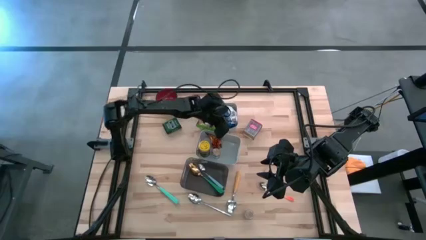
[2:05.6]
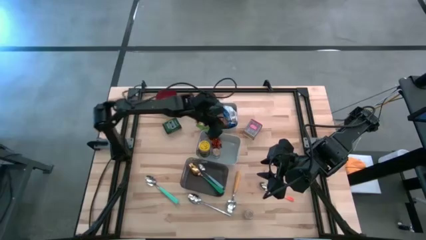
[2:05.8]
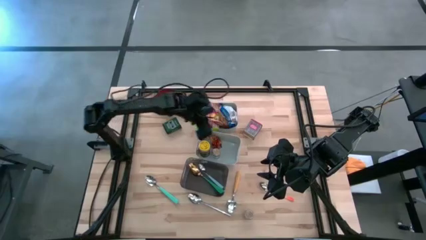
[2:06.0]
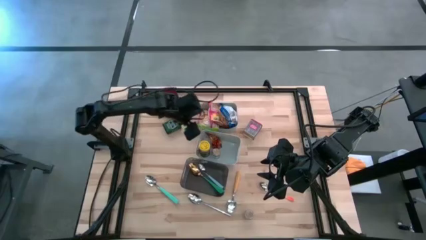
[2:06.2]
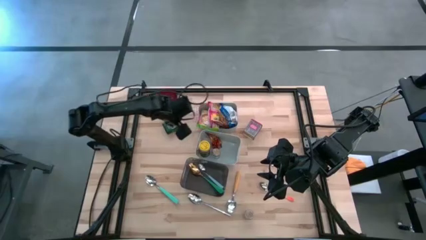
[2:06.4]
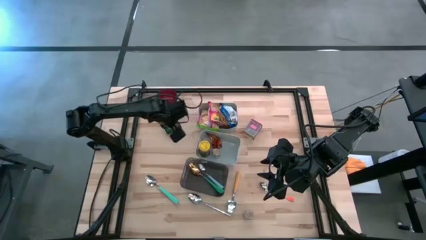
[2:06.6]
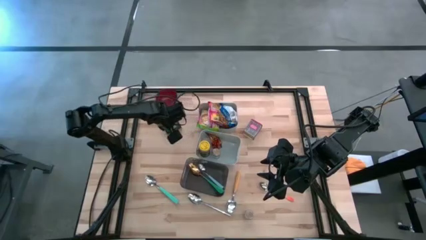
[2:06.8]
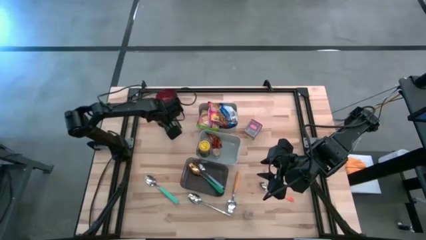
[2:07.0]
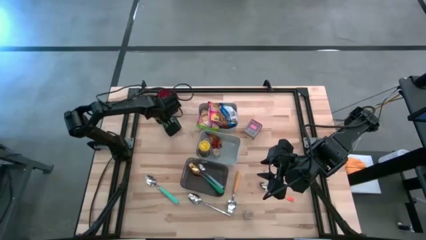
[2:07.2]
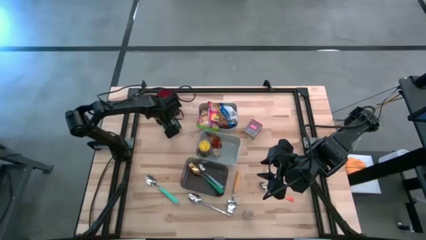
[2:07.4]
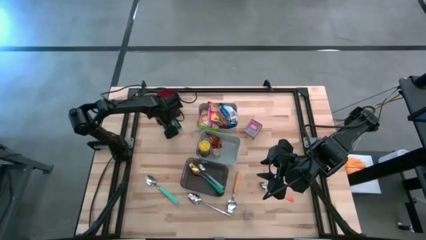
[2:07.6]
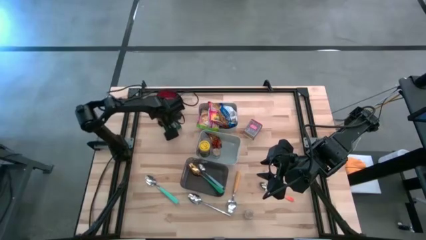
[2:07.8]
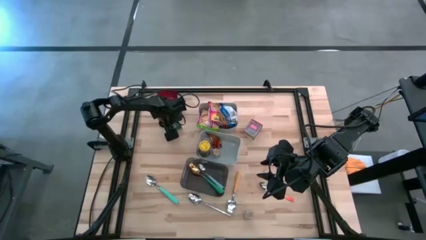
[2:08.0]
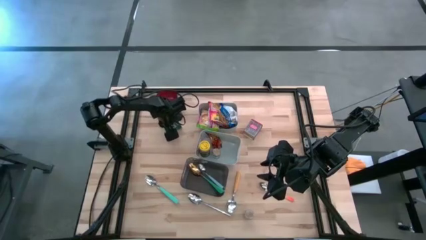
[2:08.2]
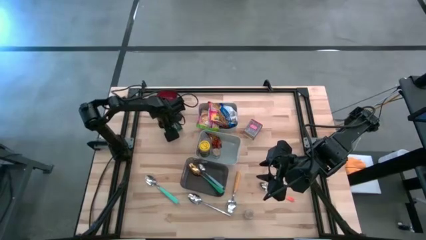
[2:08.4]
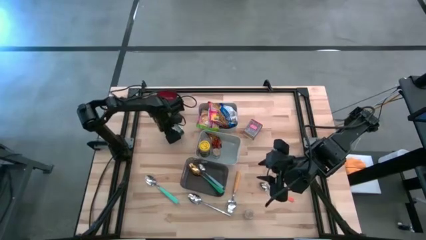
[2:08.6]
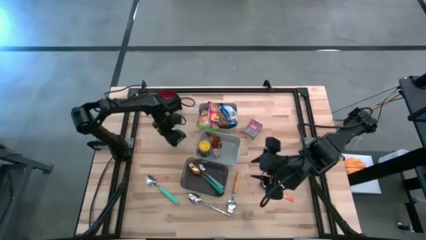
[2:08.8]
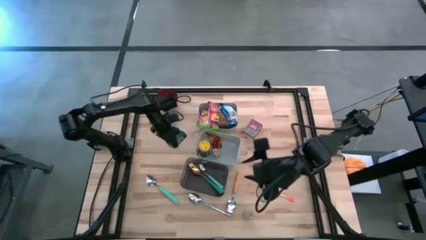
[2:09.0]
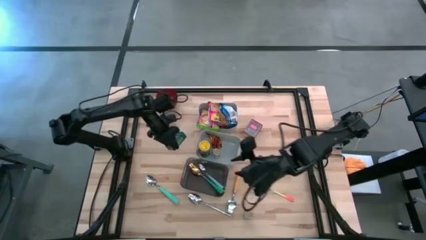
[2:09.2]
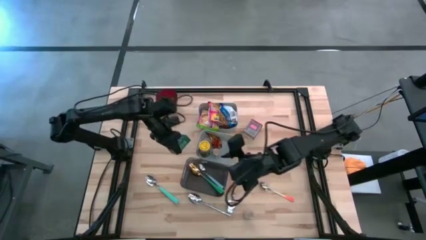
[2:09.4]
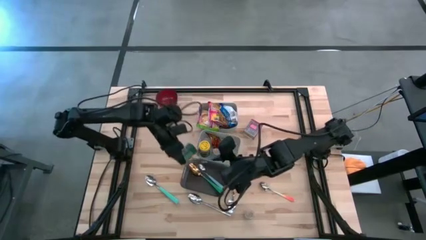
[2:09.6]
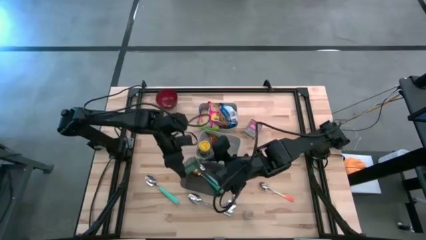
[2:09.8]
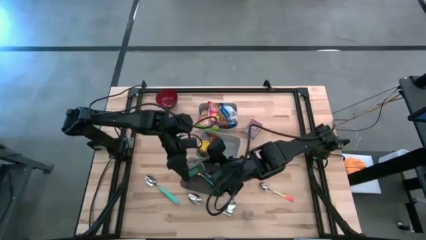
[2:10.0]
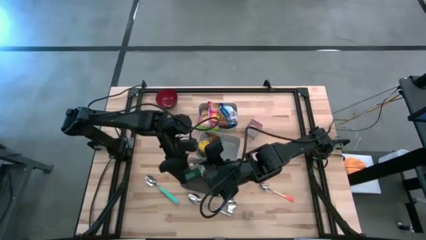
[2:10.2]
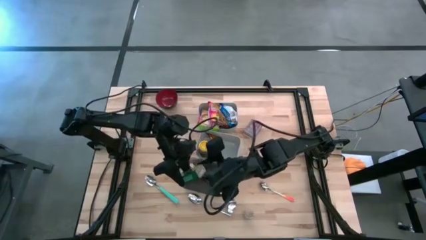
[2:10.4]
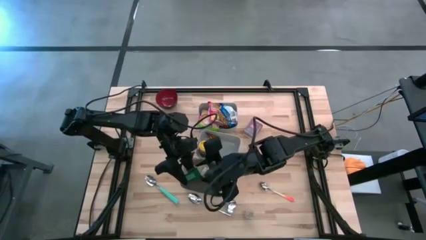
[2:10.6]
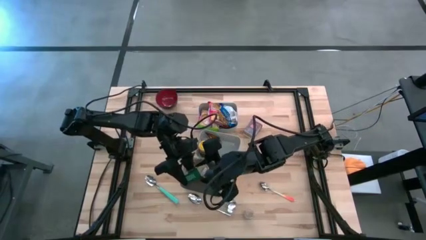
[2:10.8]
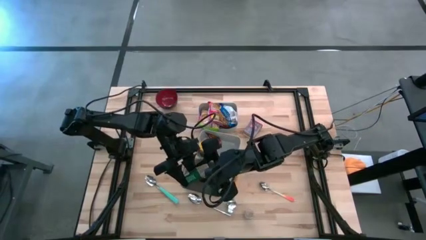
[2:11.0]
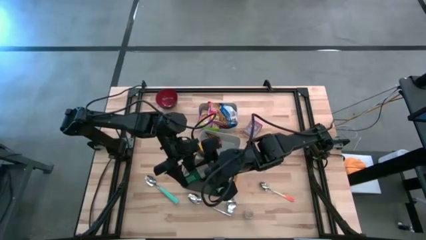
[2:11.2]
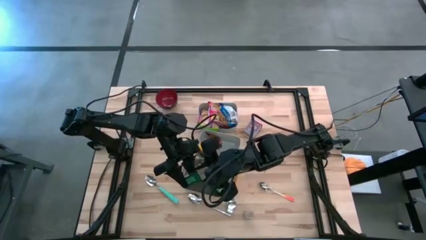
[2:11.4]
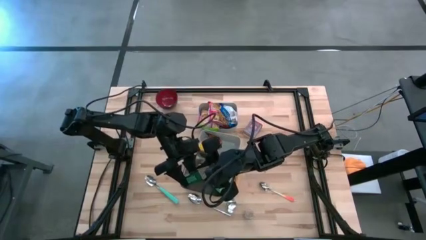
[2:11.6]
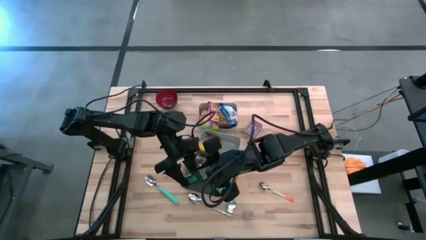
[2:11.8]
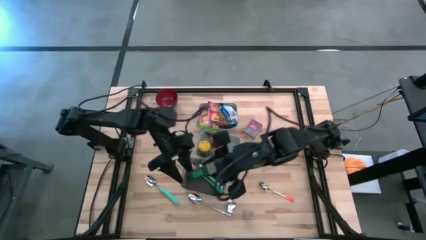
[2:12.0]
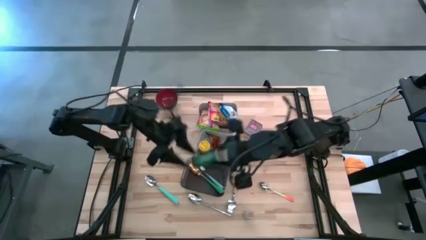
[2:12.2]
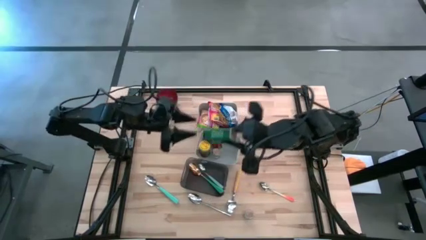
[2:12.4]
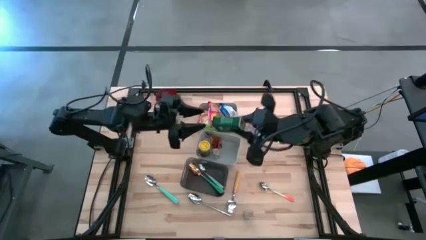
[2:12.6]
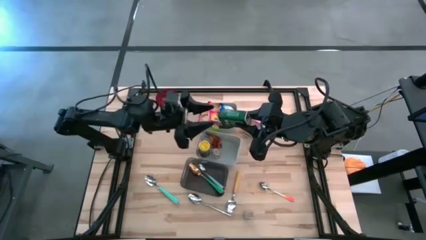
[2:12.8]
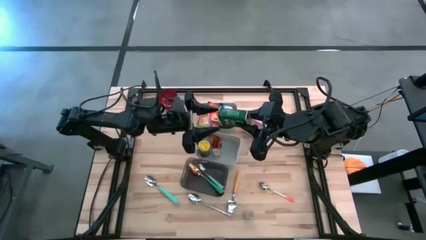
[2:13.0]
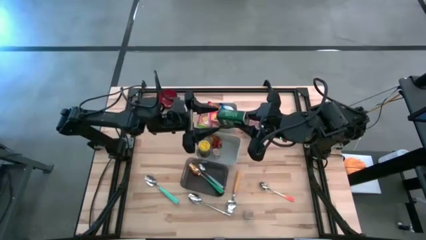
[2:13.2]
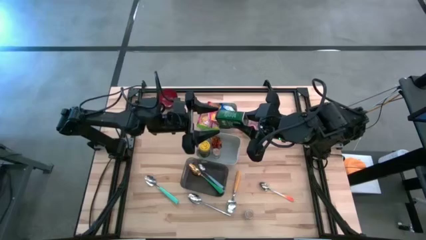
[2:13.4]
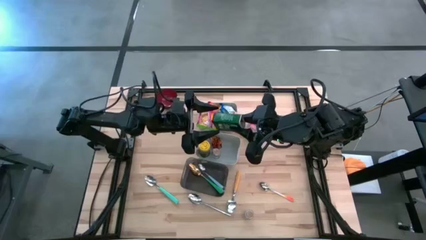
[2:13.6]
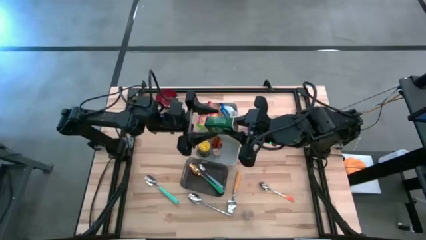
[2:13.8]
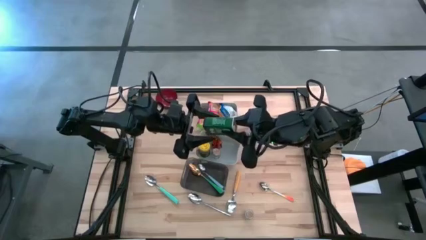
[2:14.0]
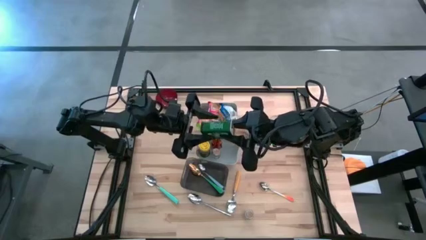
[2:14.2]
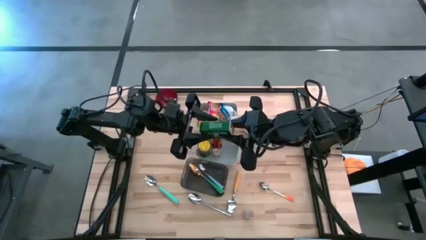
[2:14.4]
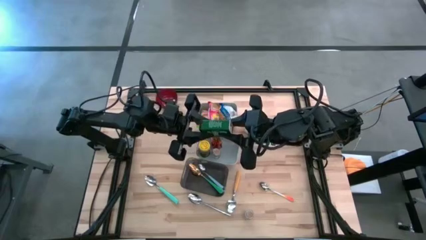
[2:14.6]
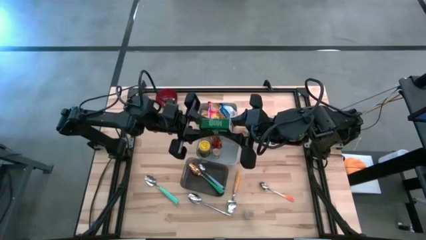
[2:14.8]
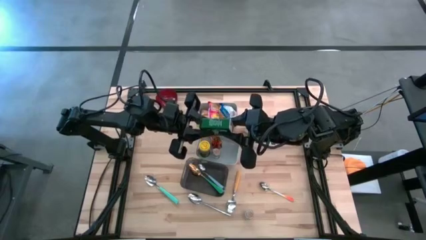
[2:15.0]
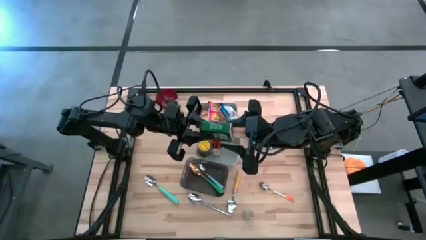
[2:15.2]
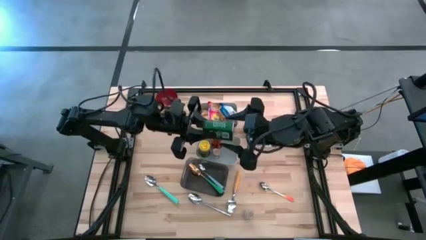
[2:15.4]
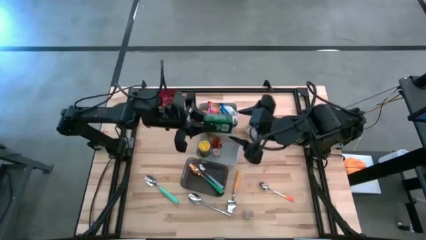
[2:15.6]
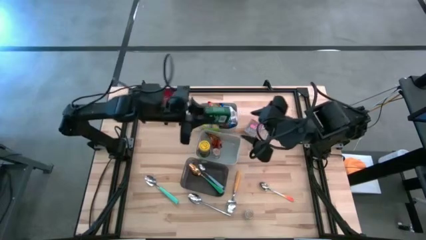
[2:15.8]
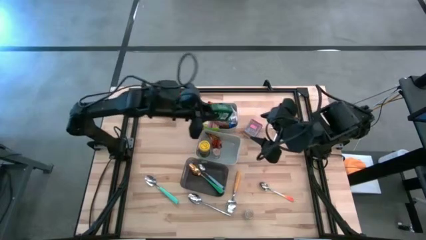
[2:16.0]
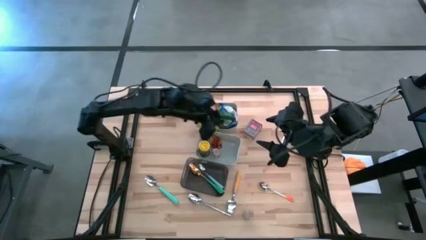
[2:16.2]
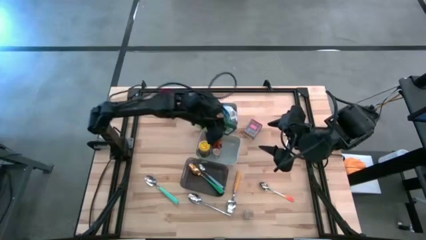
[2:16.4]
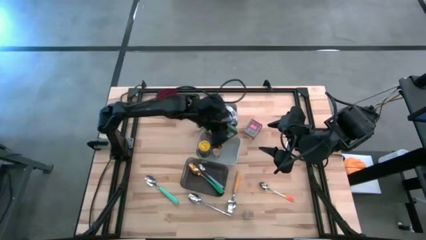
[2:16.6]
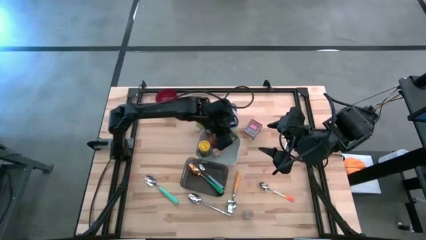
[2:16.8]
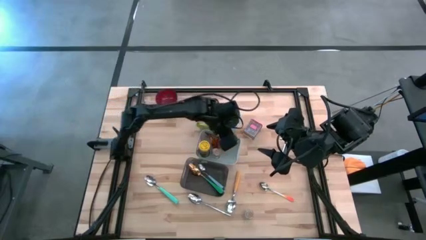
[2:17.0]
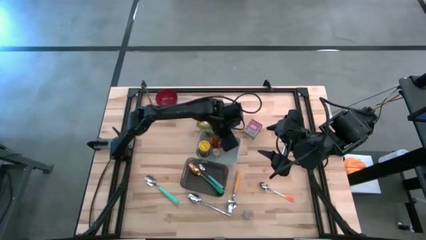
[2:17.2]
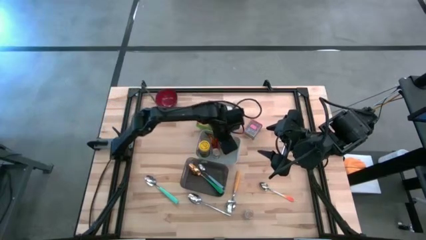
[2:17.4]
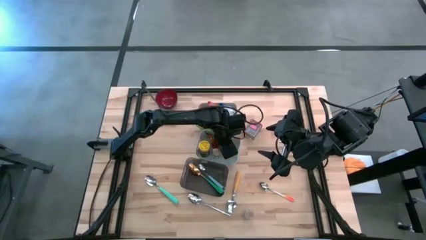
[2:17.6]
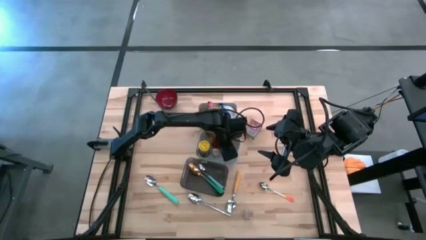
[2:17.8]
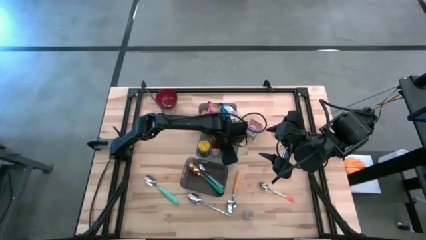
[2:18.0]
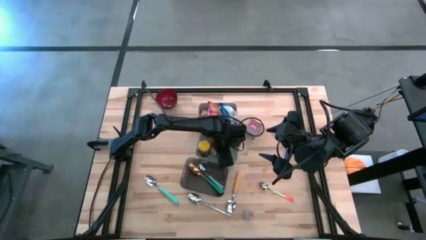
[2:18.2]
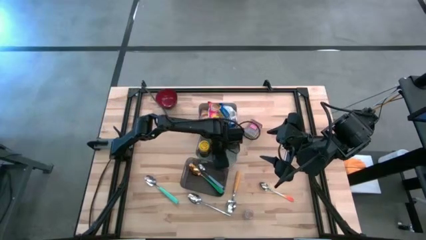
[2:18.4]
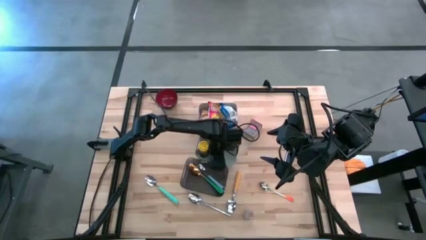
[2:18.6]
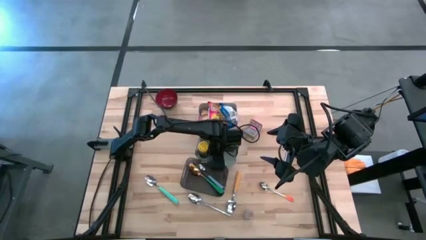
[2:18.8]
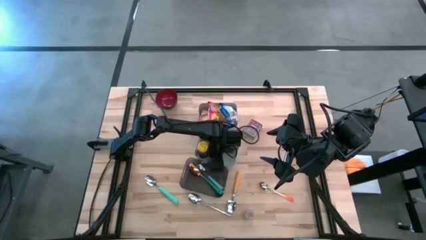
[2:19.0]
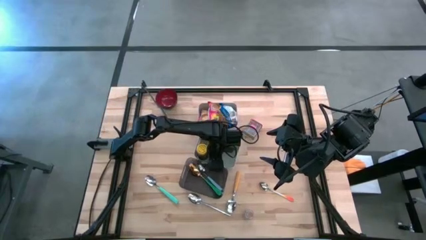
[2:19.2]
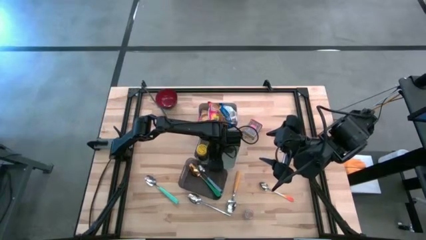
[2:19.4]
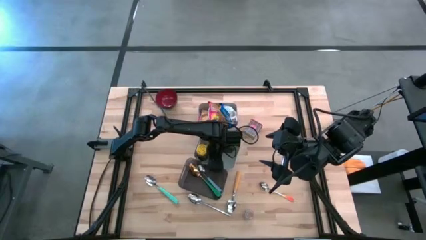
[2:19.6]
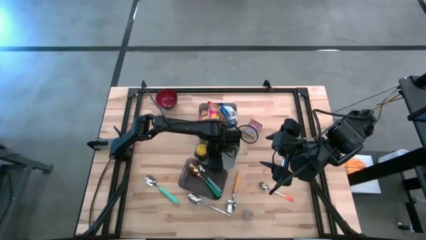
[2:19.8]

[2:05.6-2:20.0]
Put the black seasoning can into the bottom gray bin
